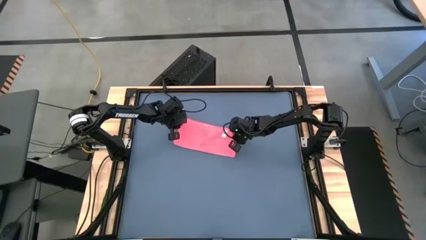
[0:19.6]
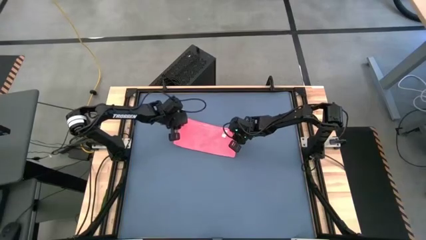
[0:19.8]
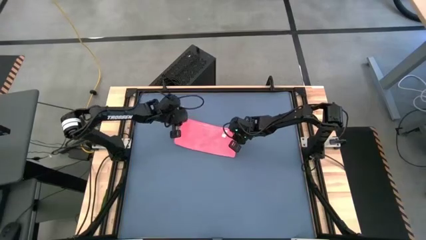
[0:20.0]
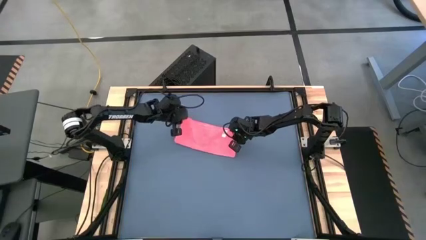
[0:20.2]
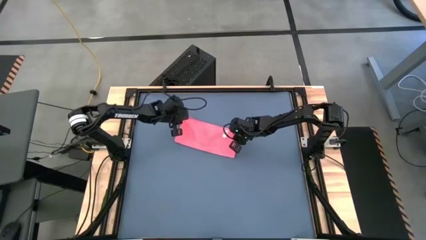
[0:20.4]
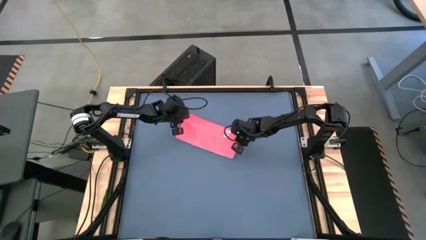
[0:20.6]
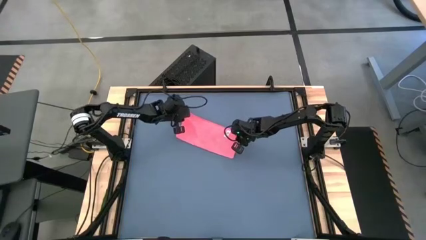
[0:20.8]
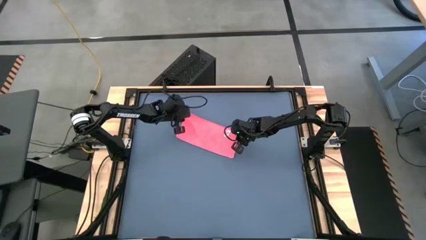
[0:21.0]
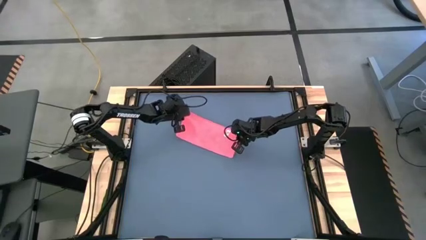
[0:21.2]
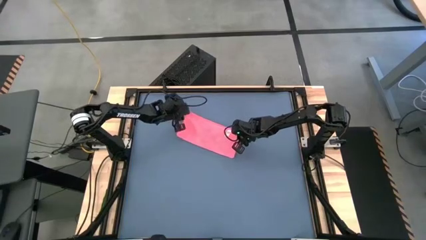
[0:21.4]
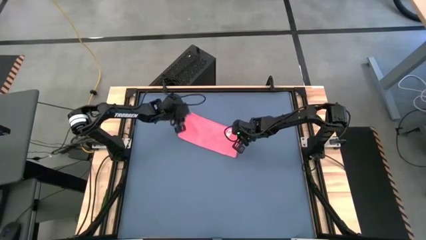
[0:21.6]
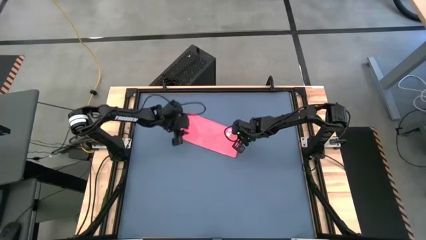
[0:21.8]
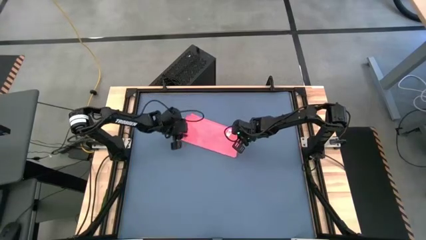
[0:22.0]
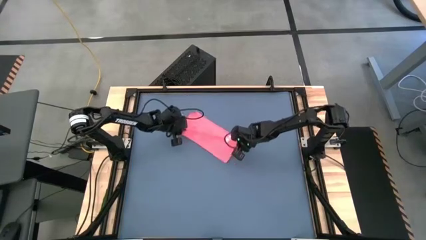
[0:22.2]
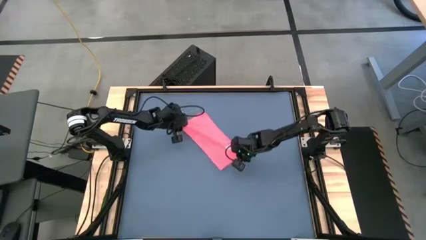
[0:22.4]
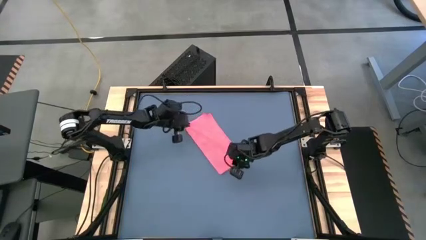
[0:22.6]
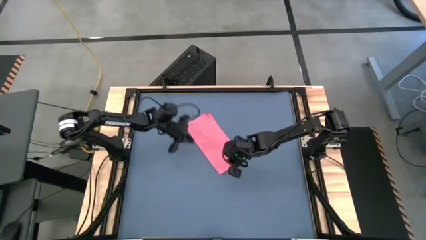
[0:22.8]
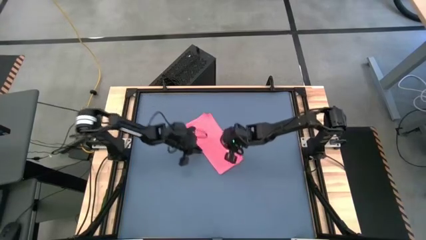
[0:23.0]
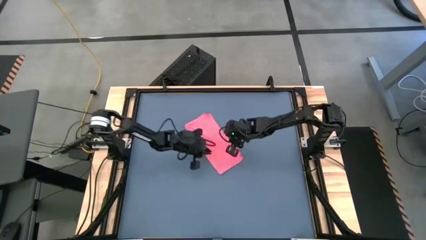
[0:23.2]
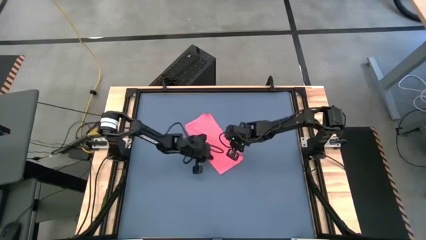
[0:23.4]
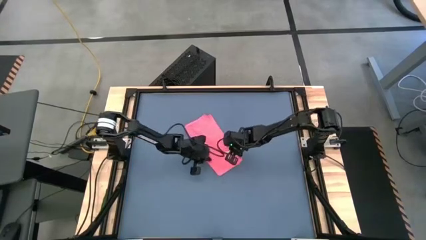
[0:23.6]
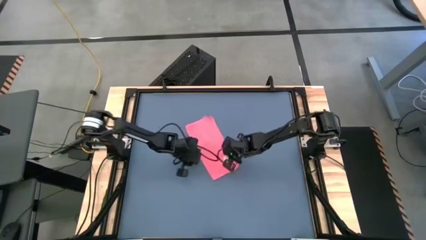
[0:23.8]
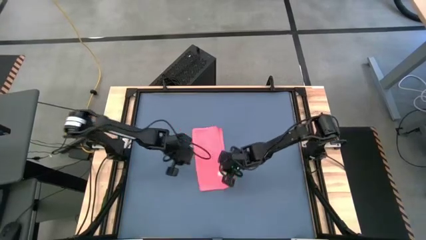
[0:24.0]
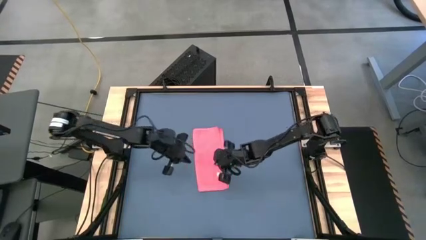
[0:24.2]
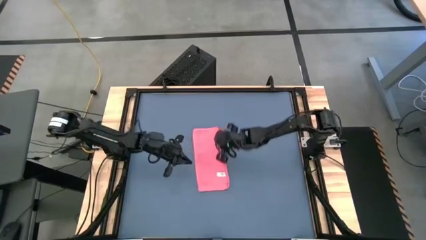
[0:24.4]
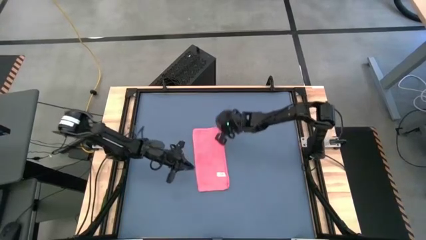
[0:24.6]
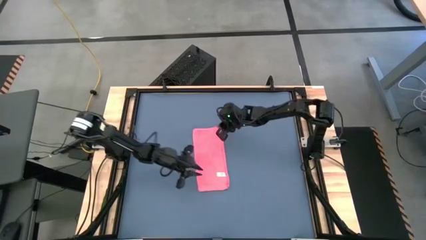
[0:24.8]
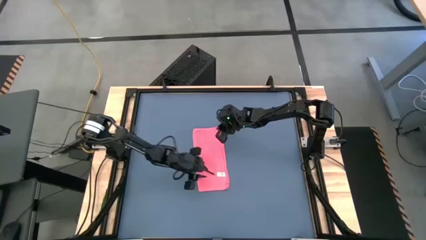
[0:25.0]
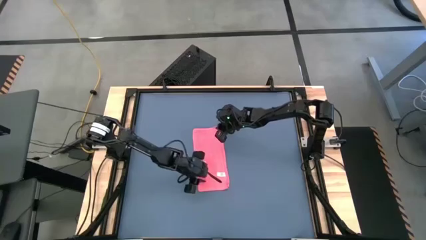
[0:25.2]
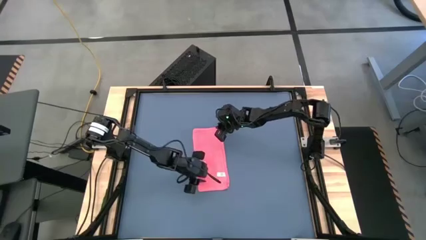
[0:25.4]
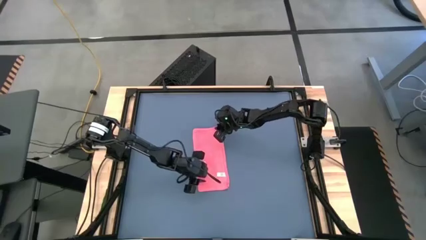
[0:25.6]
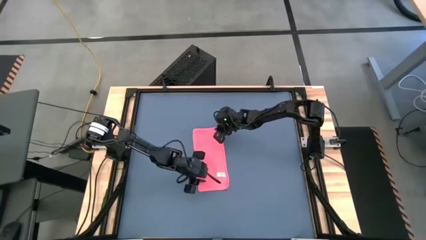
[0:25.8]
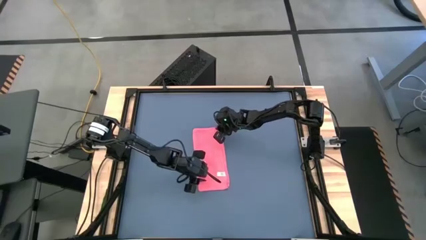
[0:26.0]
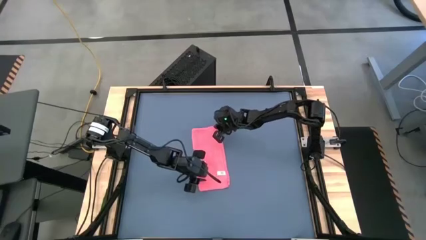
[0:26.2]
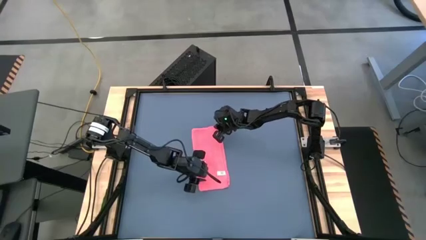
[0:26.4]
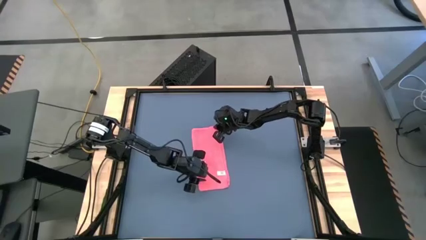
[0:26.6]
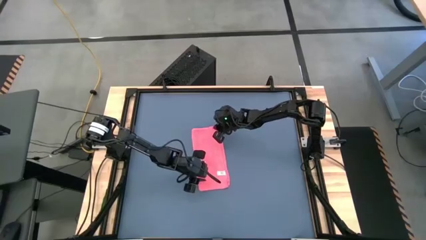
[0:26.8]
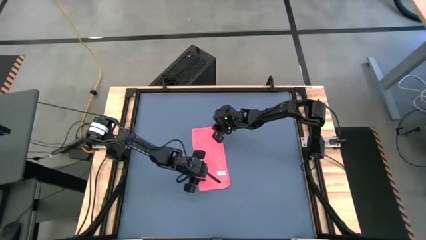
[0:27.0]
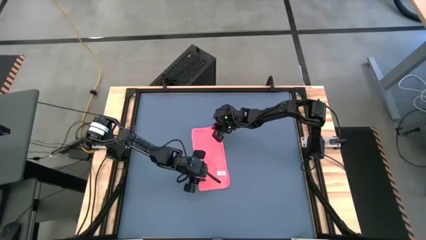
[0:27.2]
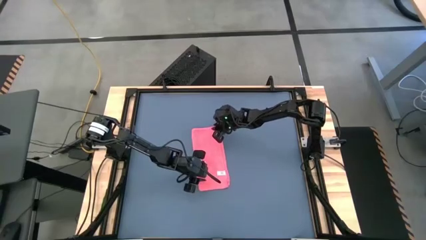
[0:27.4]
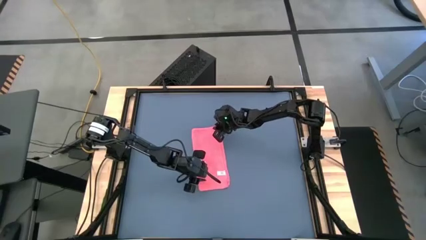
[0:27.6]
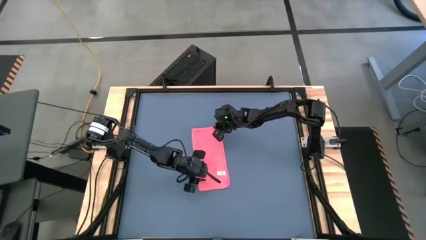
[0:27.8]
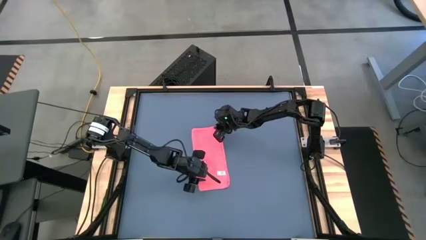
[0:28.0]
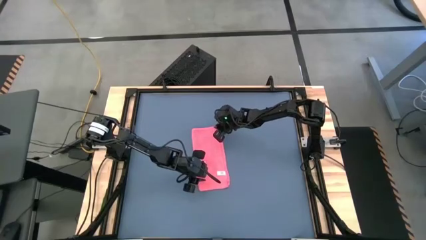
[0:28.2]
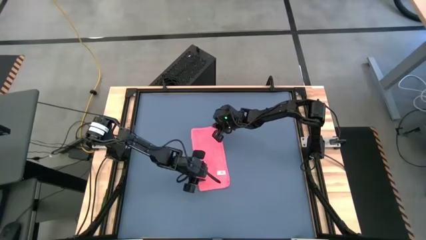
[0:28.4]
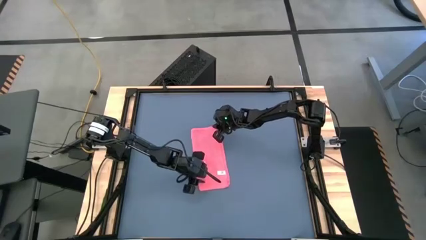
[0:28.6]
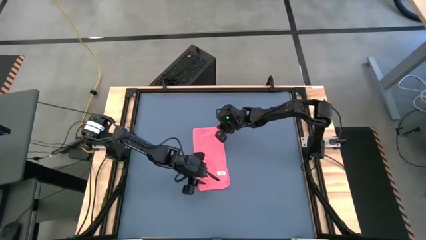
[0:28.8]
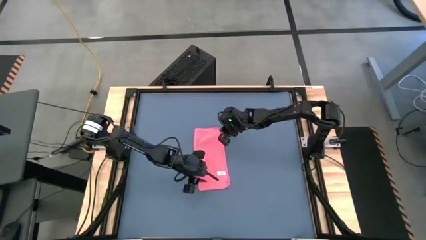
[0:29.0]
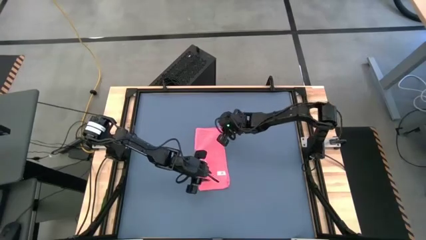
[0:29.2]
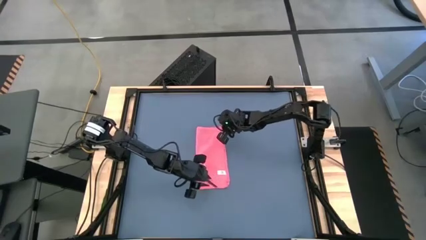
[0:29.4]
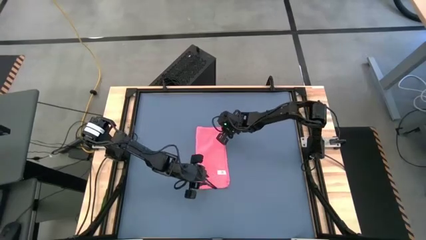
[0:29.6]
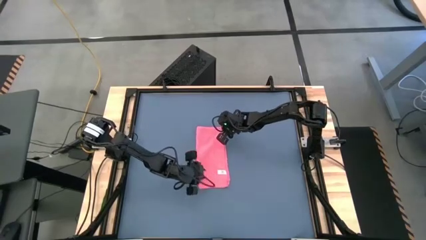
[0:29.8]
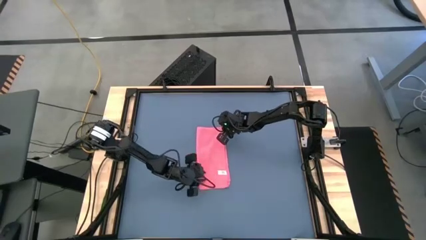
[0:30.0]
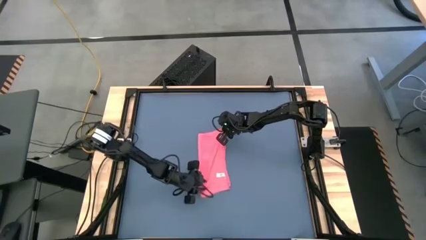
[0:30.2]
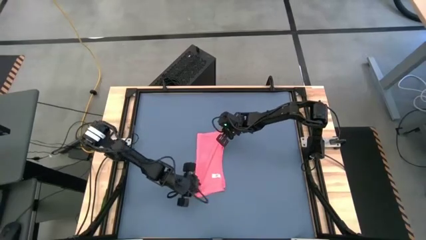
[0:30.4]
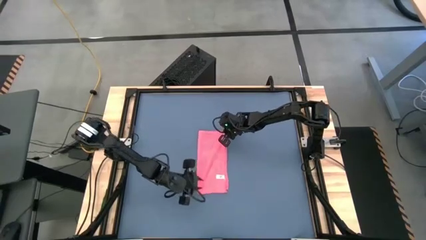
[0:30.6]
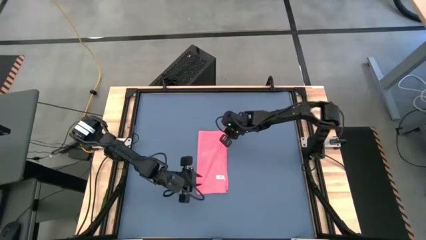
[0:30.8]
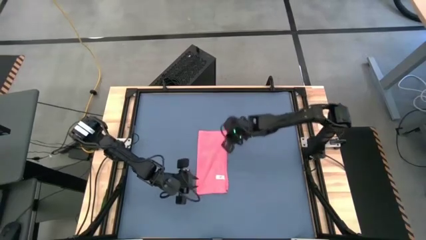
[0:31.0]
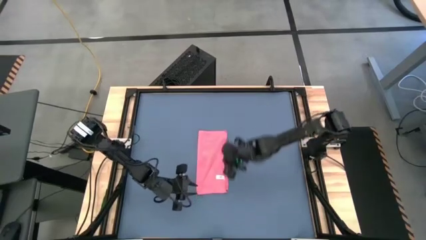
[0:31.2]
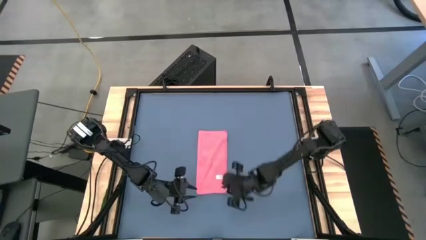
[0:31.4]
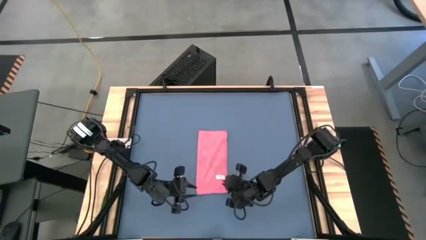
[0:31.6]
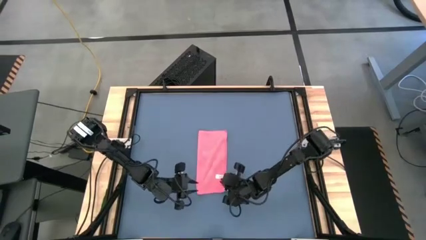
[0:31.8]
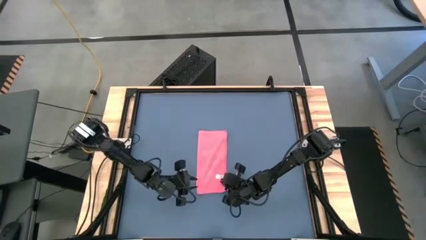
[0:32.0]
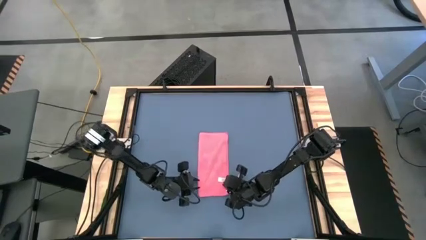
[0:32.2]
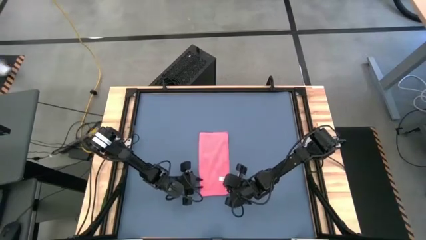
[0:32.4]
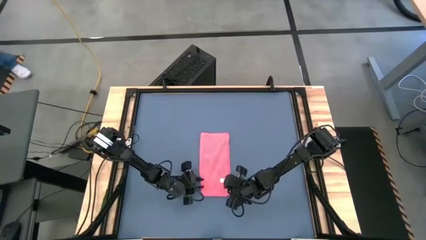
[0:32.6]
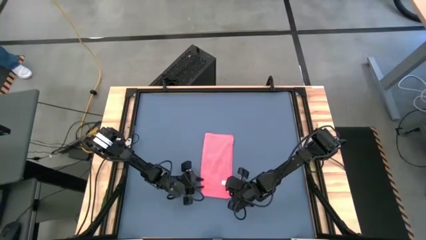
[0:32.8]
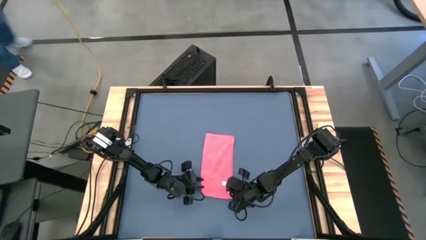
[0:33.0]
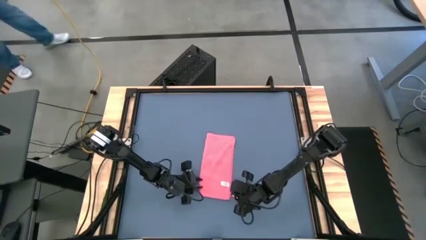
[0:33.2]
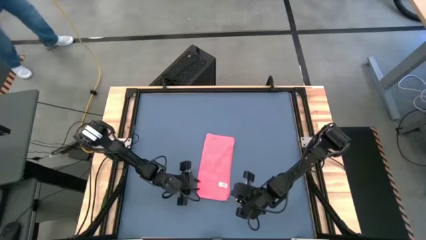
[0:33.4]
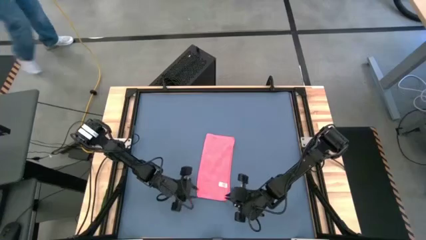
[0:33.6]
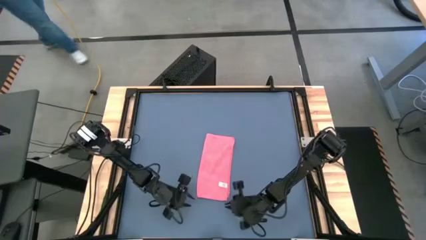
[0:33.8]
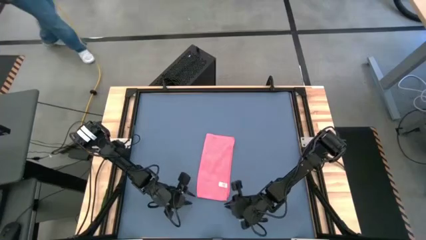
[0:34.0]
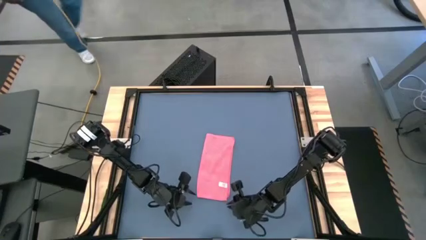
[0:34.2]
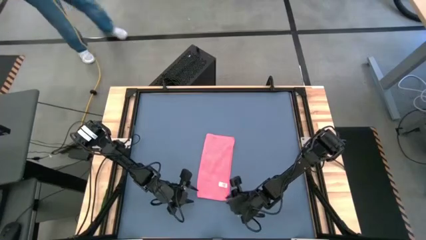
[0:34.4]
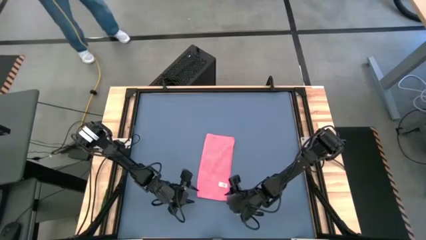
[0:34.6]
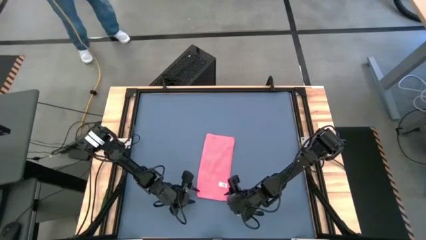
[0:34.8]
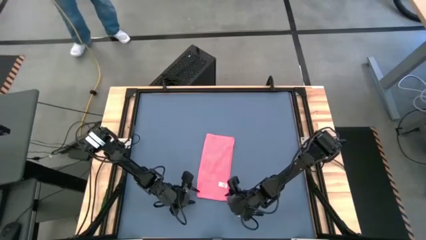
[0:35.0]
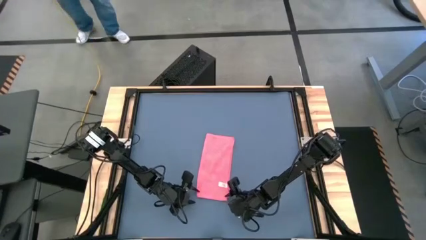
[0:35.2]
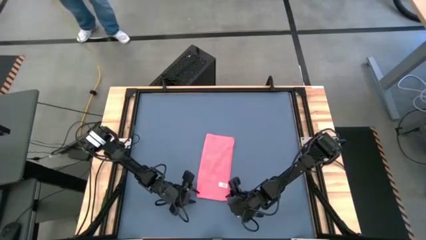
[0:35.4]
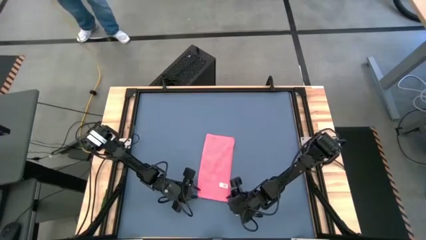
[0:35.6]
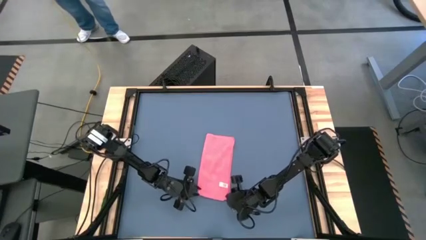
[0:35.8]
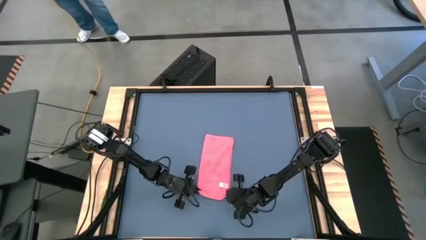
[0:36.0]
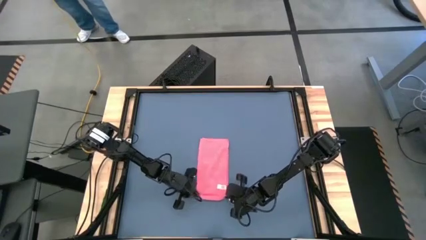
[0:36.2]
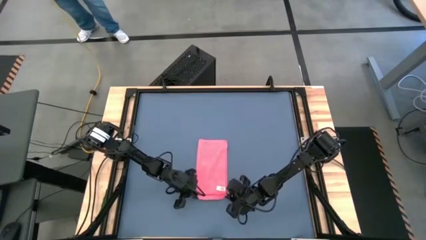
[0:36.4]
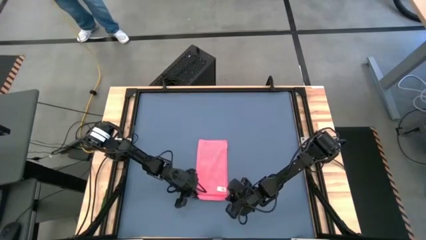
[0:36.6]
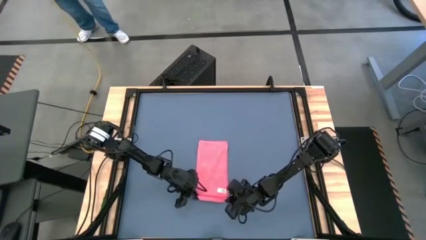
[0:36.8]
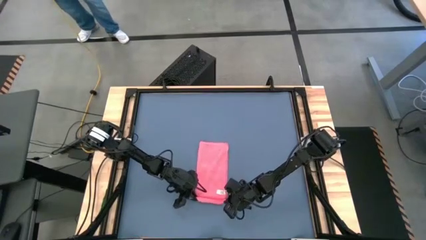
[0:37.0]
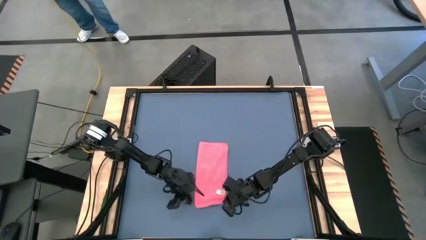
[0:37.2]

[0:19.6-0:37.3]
Task: Roll towel into tight, uniform cylinder
Roll the red towel
